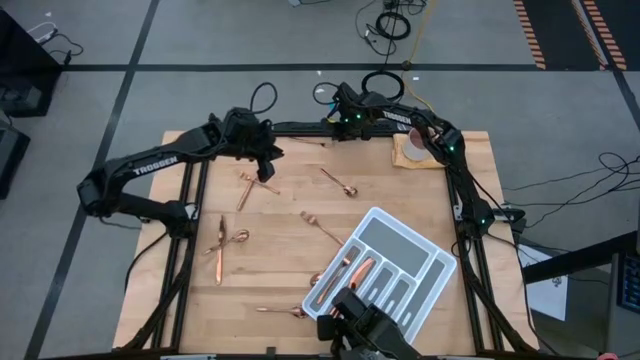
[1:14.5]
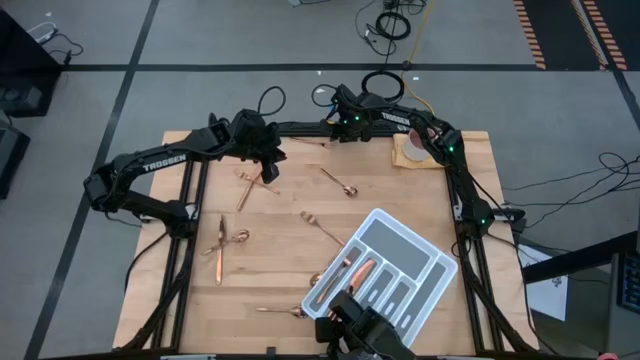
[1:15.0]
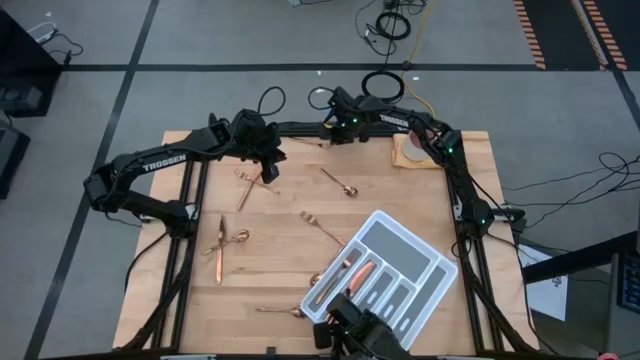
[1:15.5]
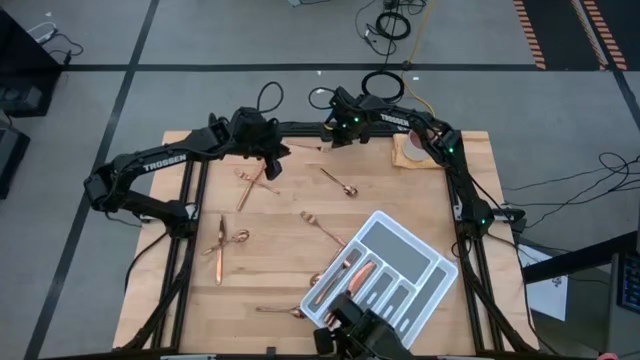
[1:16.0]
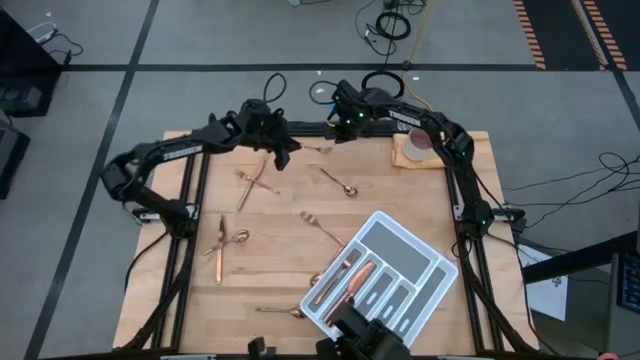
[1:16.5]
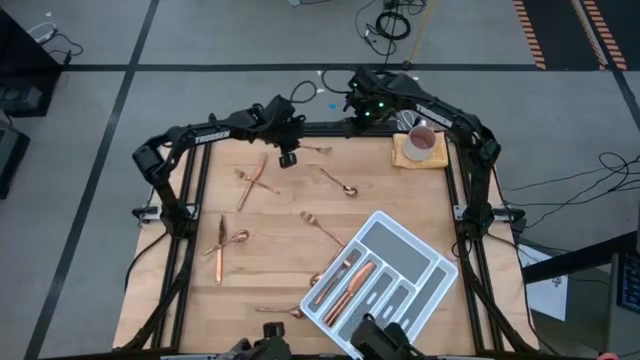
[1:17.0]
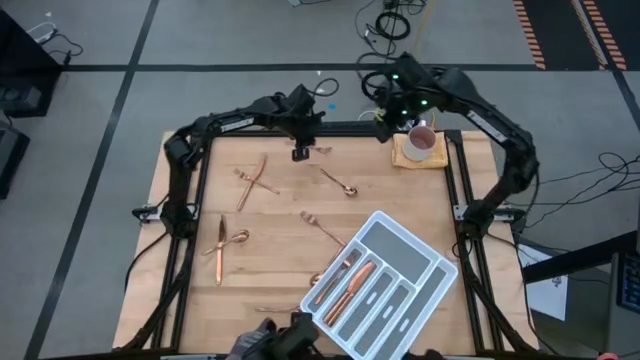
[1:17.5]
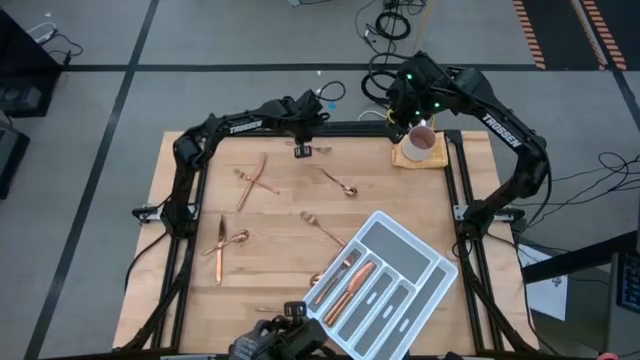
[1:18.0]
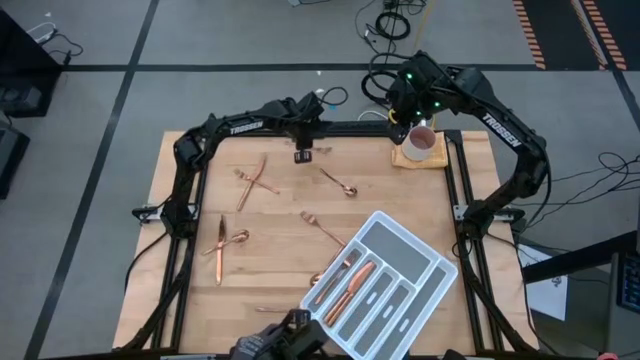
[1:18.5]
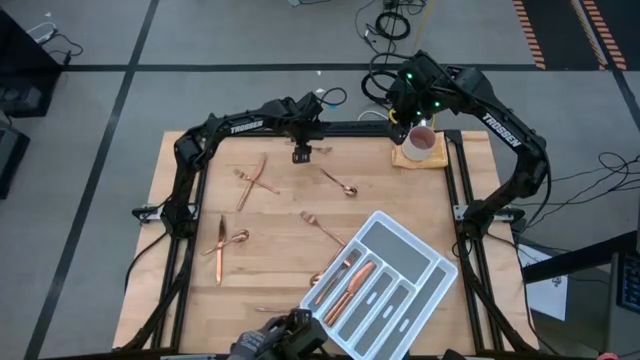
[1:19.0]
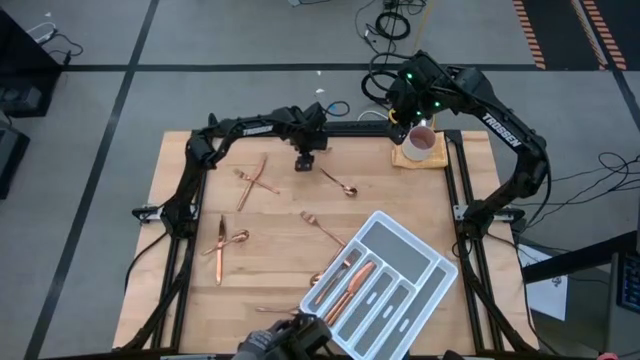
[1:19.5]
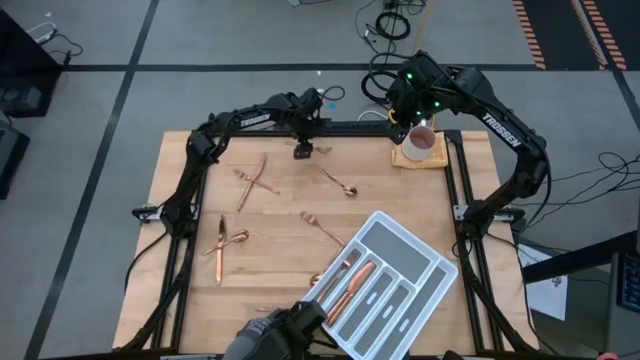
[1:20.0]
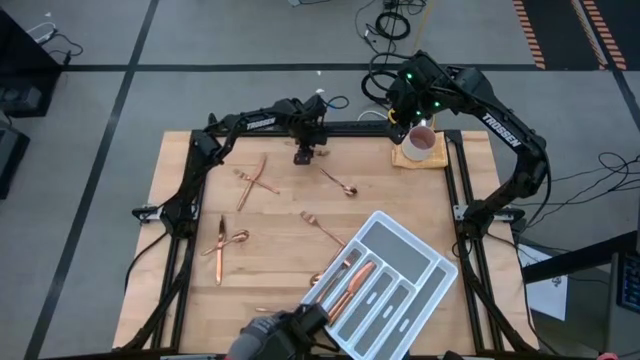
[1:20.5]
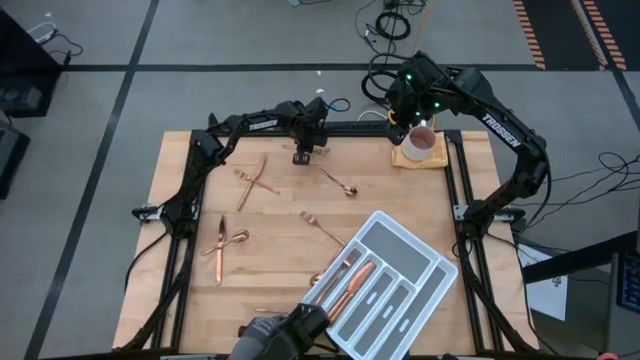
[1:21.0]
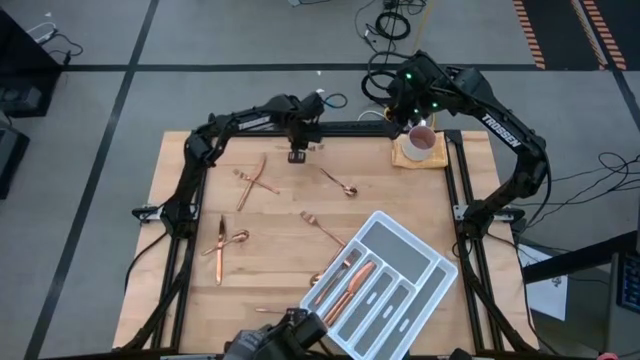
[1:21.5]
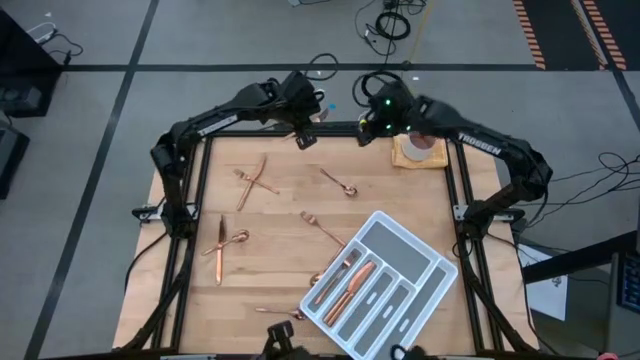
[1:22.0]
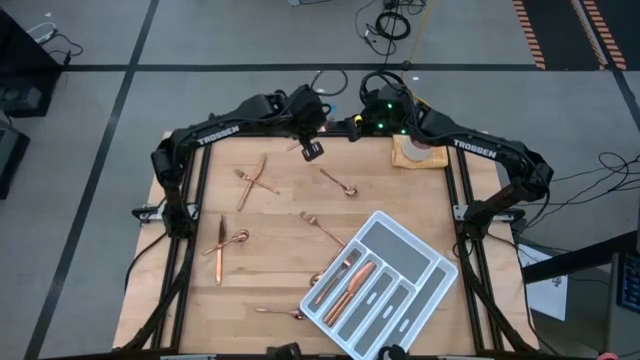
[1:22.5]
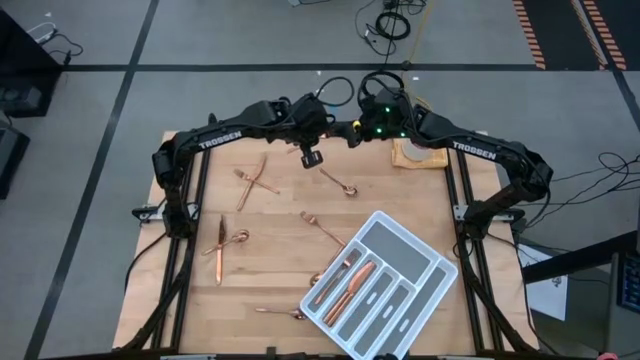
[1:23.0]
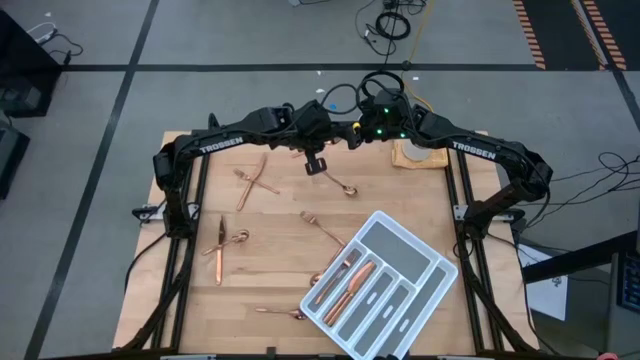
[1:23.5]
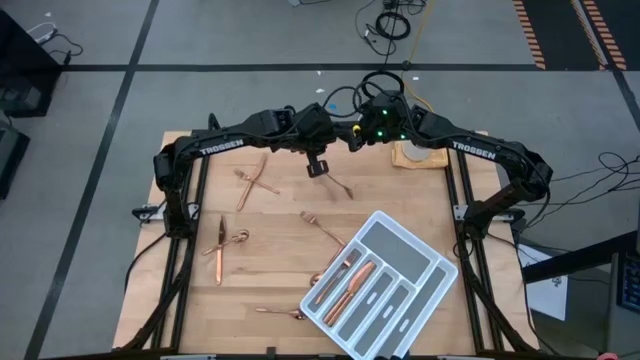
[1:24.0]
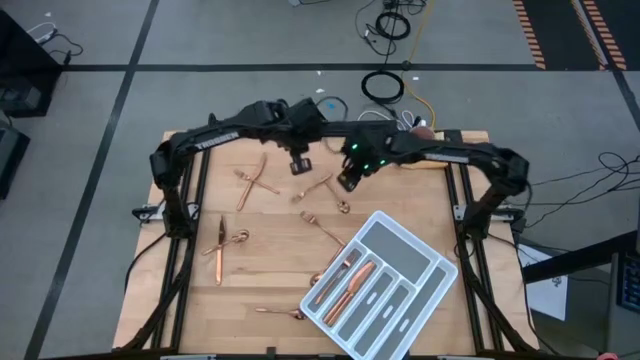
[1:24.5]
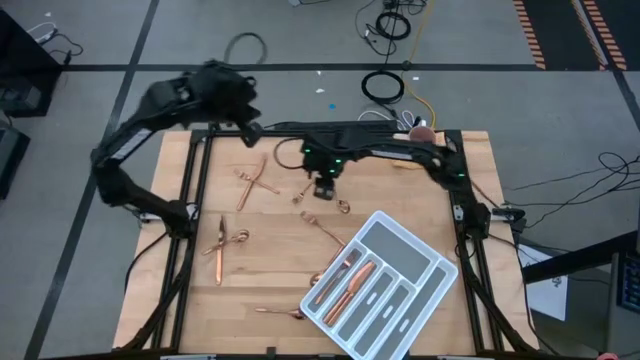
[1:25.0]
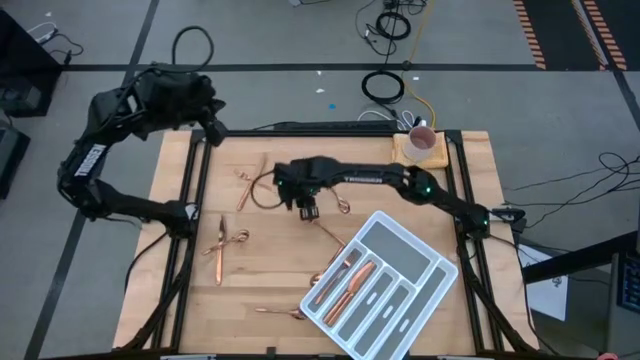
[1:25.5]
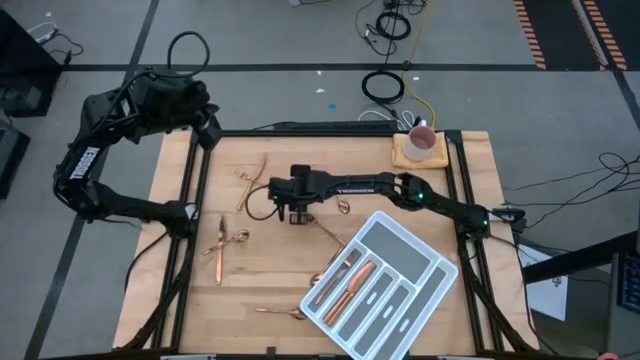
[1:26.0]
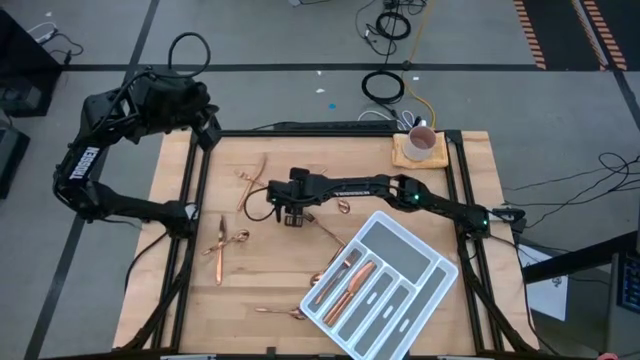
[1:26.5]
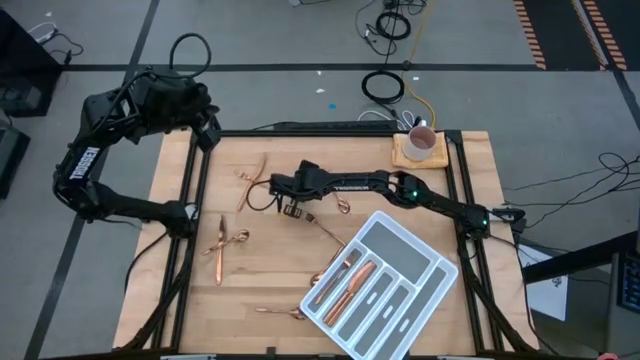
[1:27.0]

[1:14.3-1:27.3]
Task: Sort silverware
Put the gold fork into the silverware tray

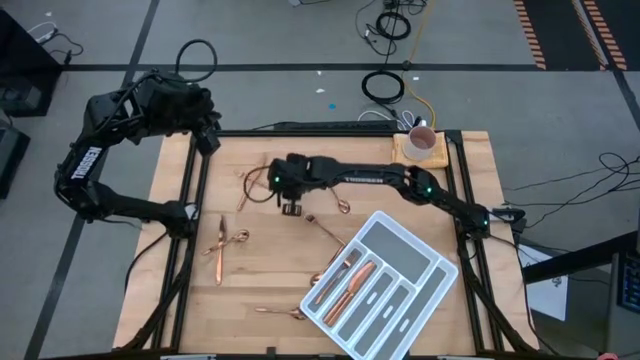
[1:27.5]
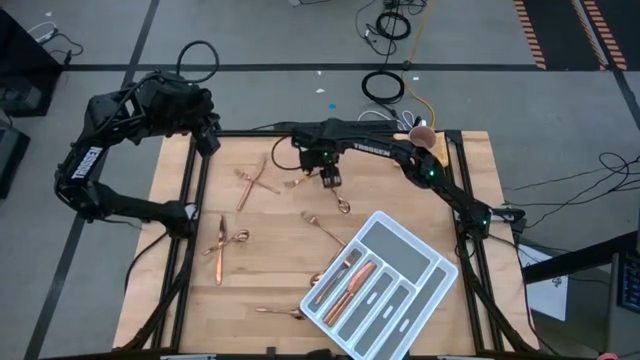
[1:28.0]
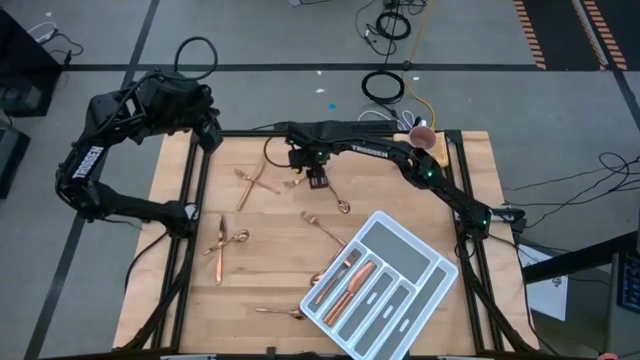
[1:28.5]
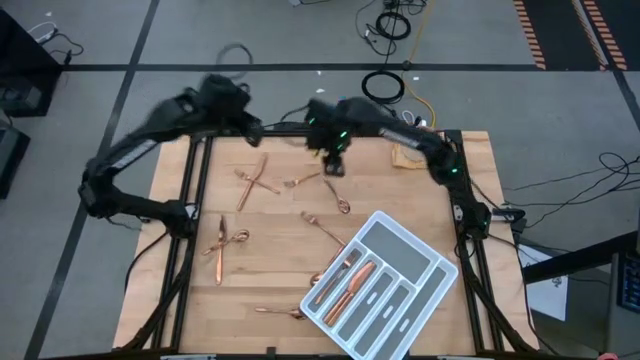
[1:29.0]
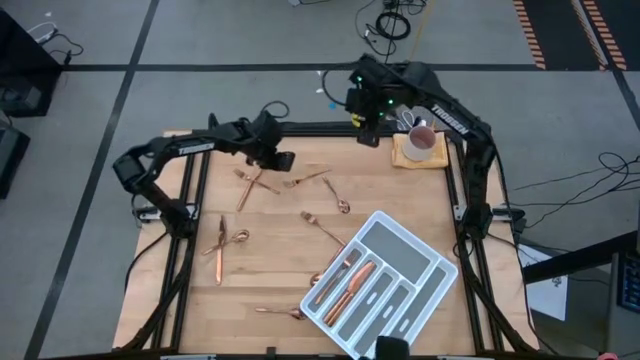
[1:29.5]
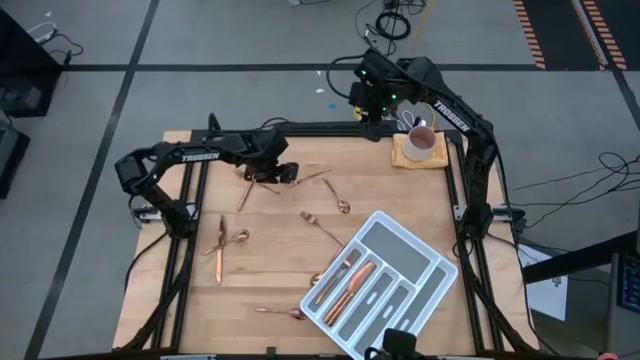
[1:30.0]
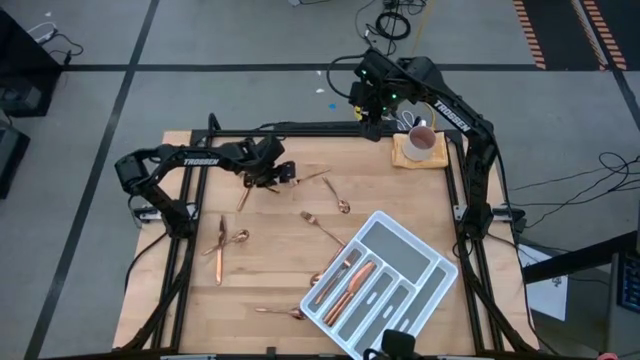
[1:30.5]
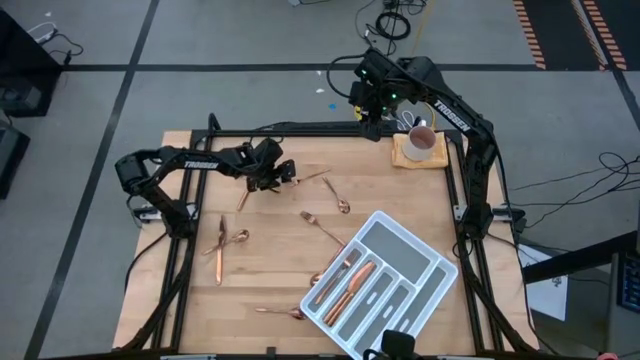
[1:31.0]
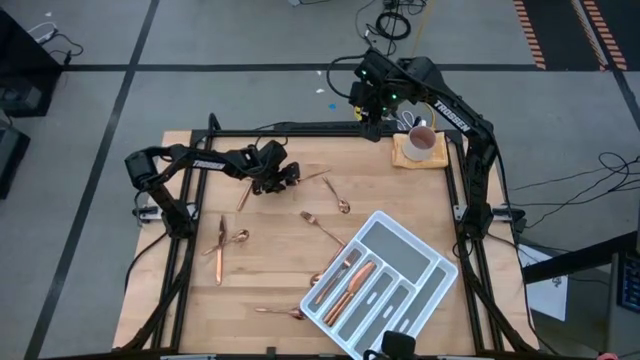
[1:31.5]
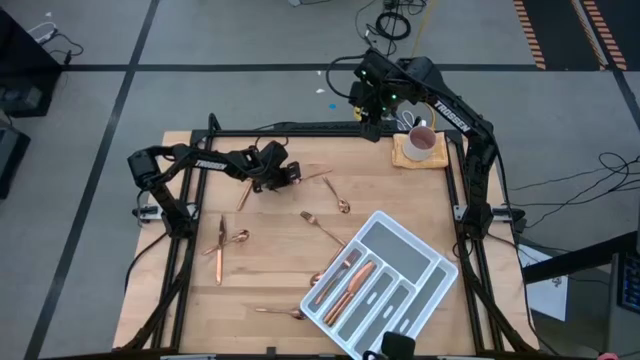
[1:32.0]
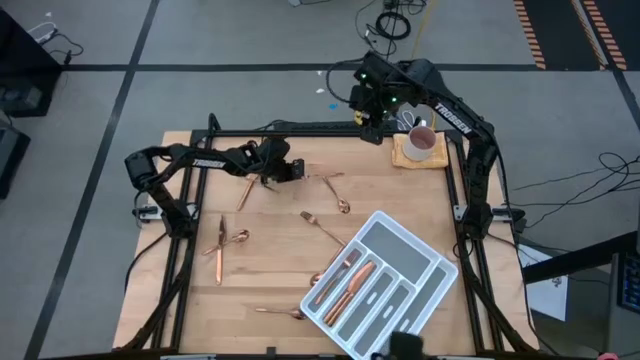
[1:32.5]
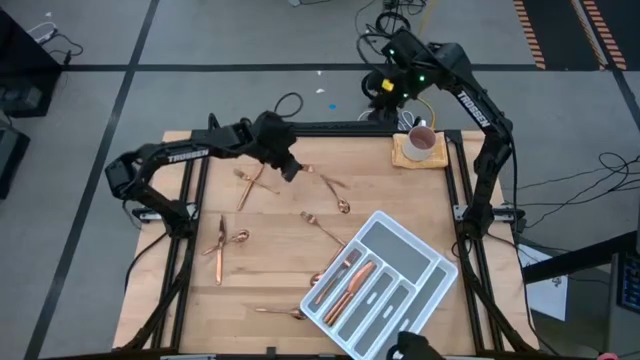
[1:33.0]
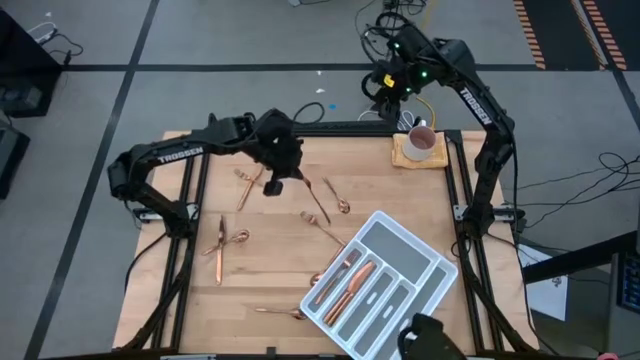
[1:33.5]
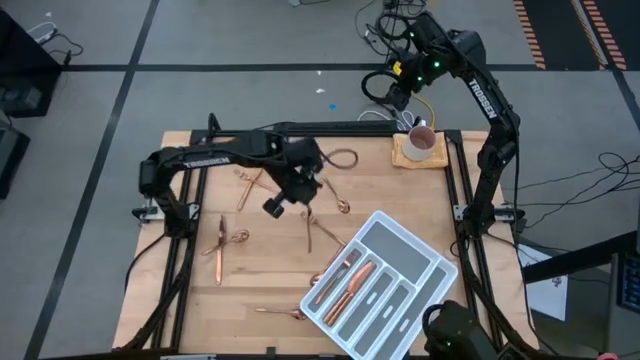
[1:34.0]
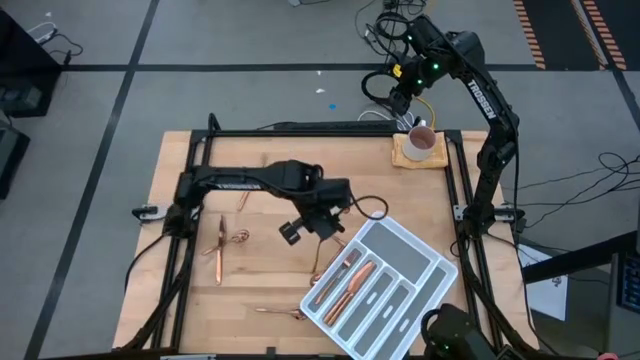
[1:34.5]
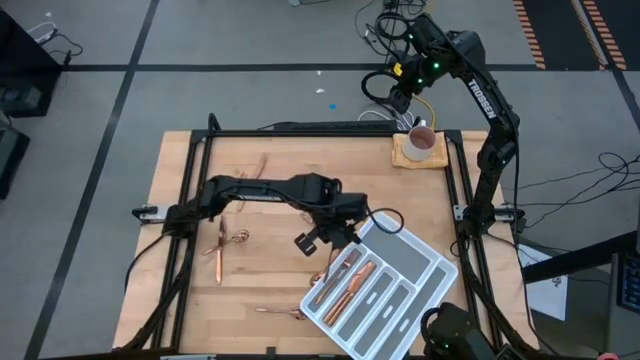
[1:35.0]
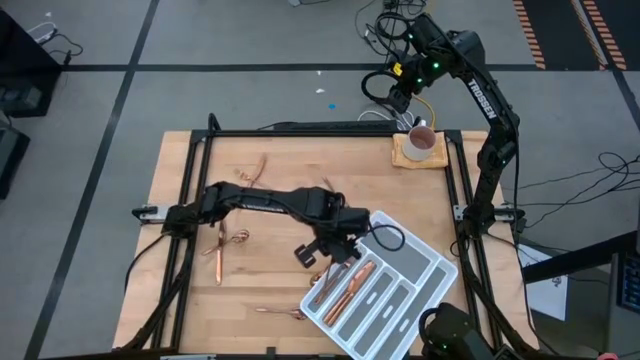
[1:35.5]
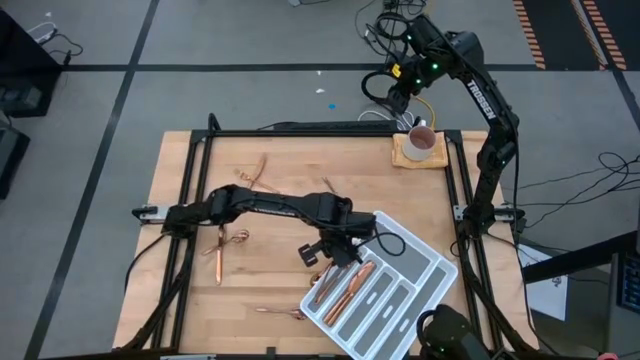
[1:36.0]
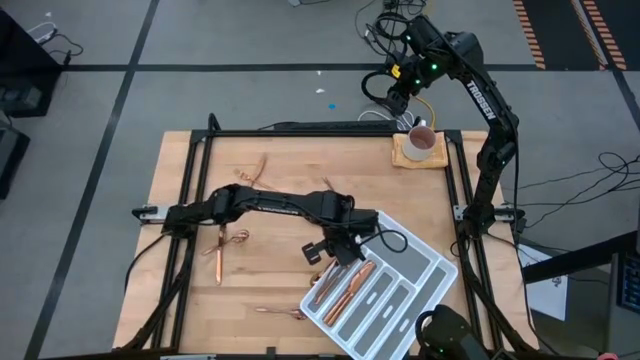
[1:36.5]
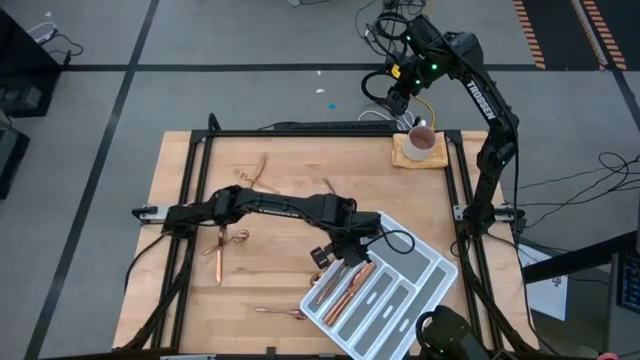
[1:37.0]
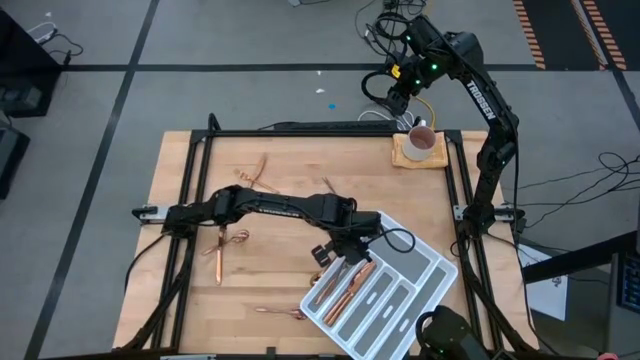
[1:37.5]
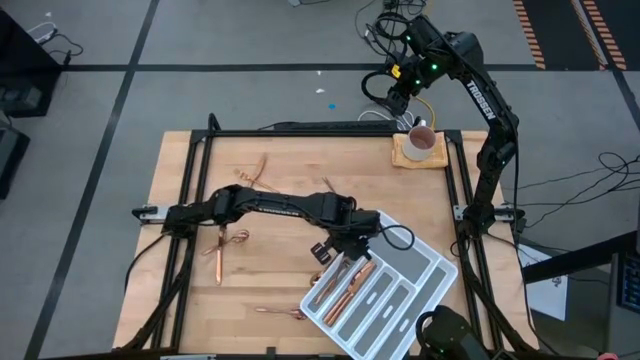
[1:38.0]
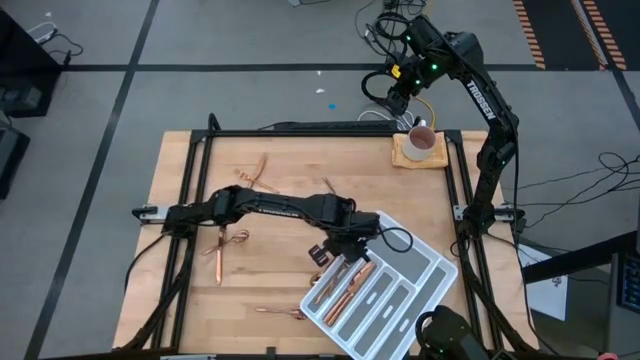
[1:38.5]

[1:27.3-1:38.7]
Put the gold fork into the silverware tray
